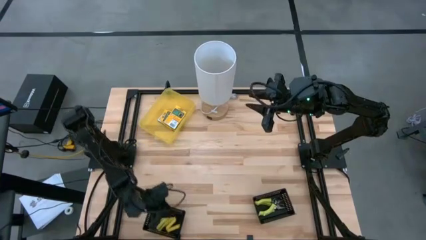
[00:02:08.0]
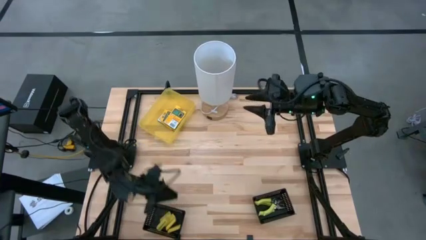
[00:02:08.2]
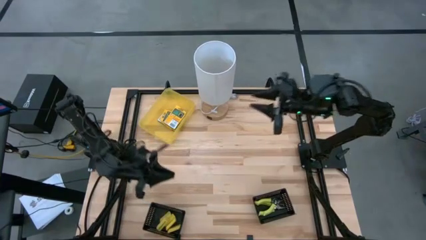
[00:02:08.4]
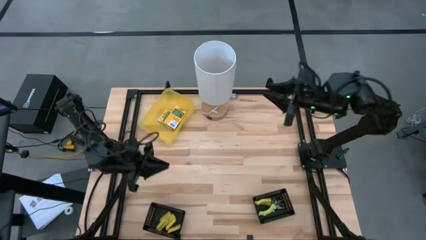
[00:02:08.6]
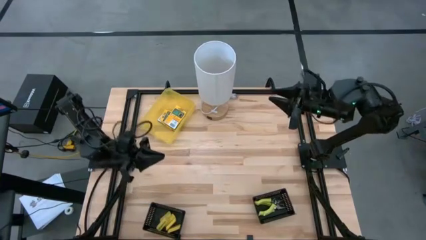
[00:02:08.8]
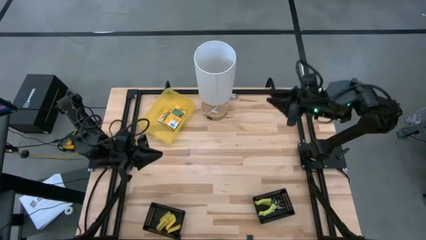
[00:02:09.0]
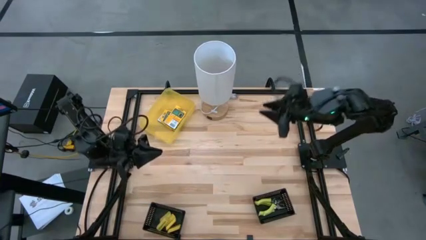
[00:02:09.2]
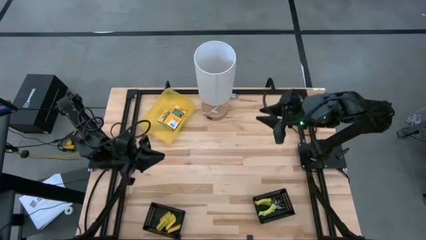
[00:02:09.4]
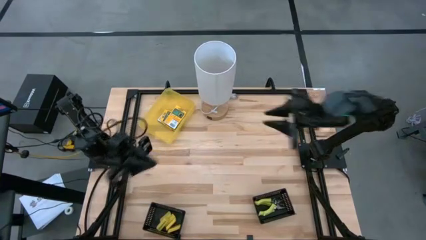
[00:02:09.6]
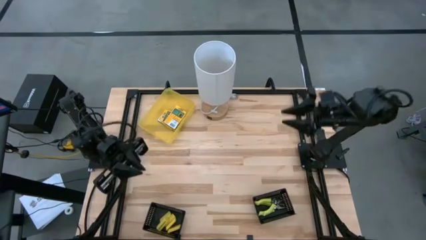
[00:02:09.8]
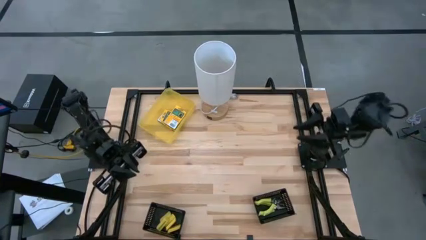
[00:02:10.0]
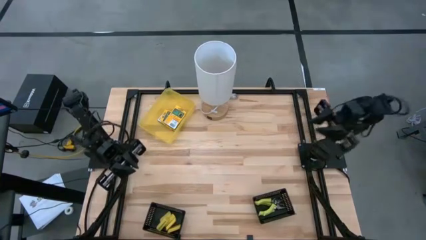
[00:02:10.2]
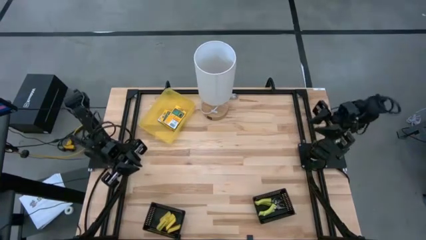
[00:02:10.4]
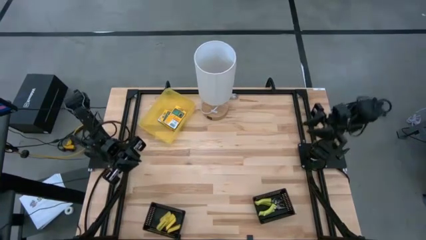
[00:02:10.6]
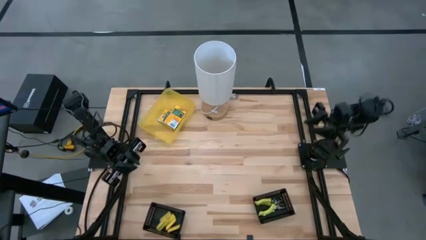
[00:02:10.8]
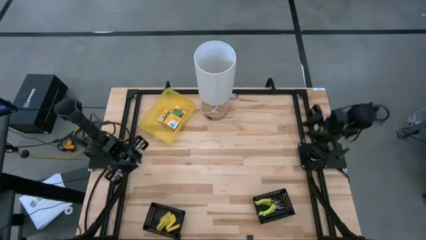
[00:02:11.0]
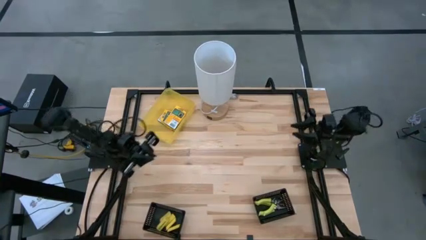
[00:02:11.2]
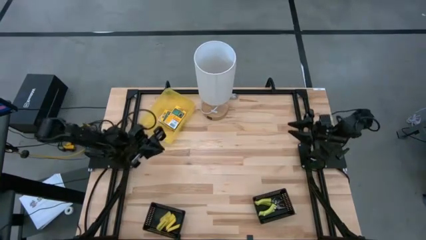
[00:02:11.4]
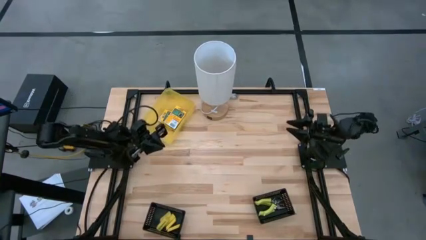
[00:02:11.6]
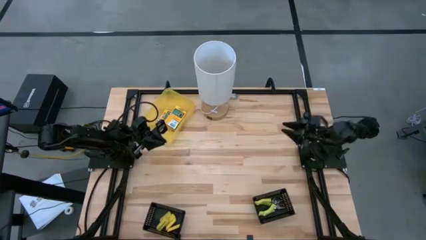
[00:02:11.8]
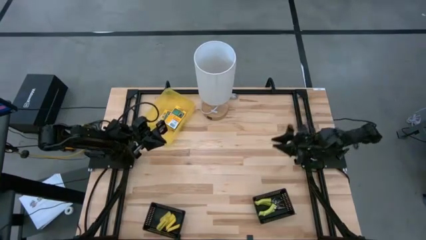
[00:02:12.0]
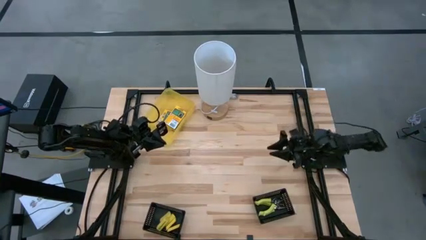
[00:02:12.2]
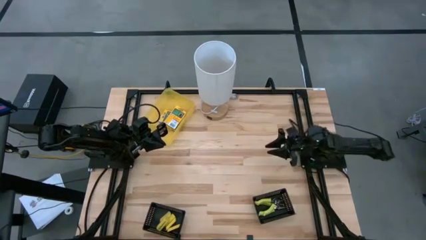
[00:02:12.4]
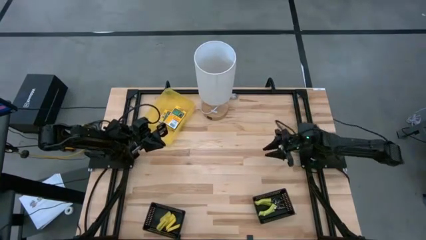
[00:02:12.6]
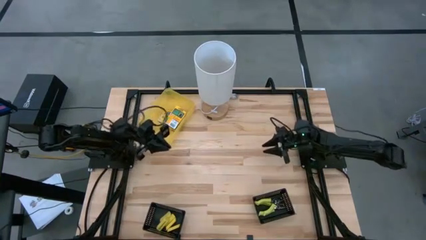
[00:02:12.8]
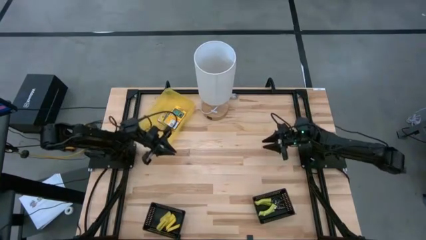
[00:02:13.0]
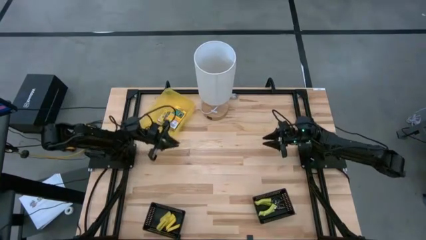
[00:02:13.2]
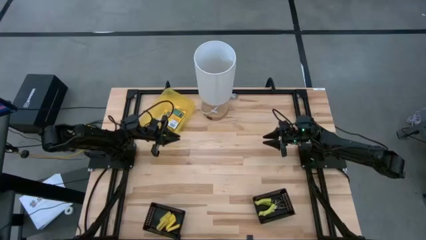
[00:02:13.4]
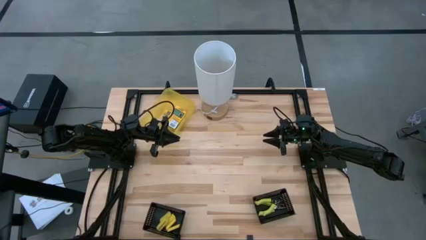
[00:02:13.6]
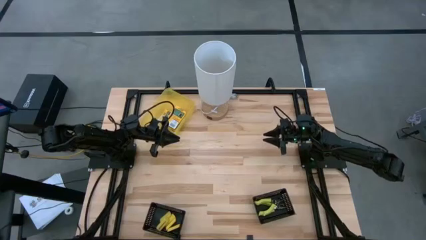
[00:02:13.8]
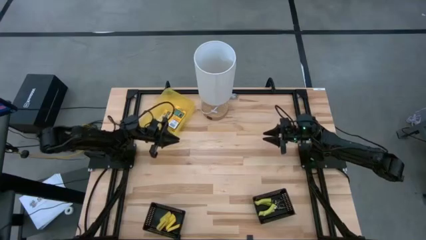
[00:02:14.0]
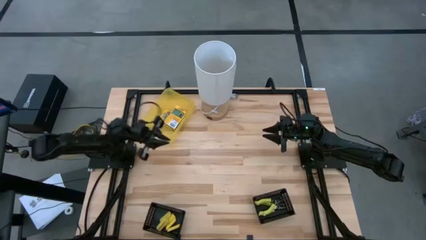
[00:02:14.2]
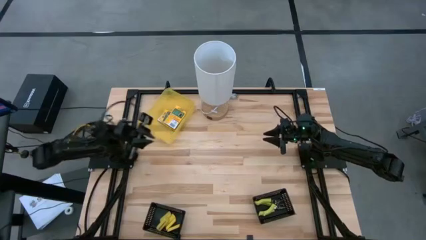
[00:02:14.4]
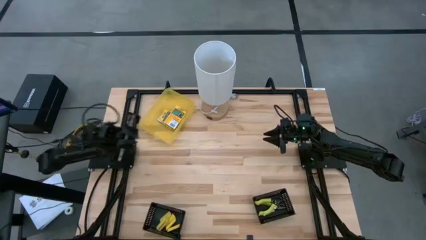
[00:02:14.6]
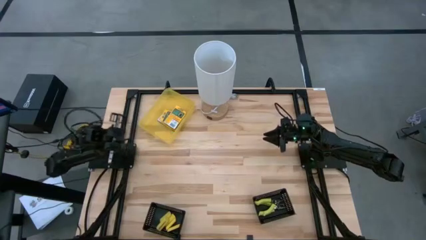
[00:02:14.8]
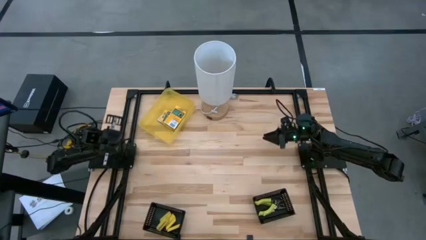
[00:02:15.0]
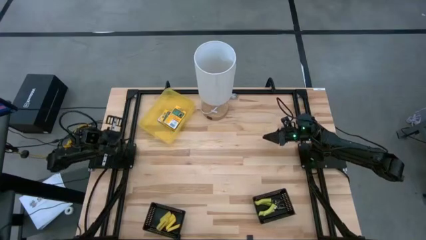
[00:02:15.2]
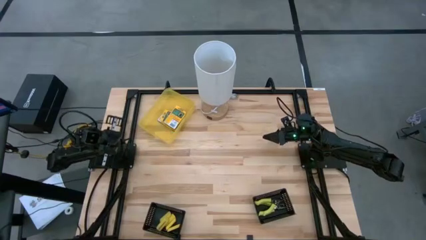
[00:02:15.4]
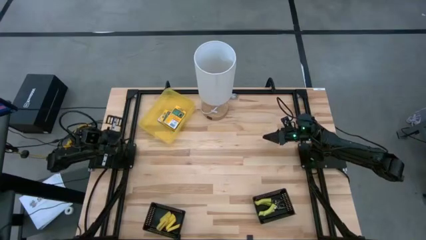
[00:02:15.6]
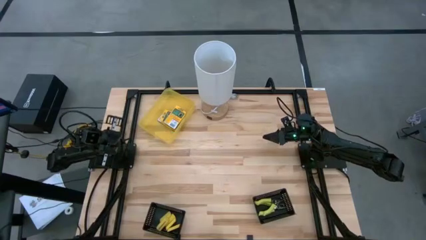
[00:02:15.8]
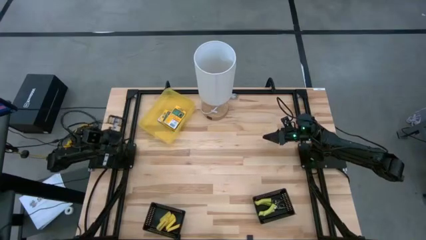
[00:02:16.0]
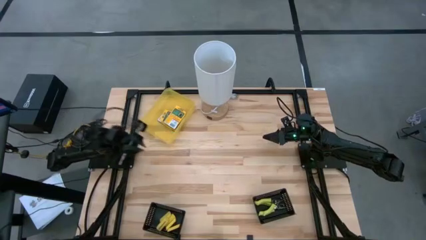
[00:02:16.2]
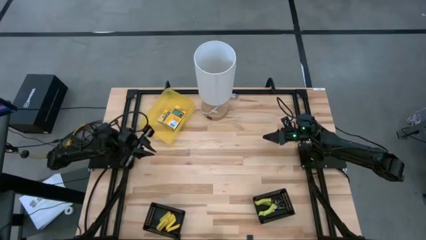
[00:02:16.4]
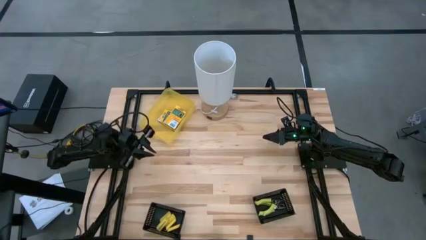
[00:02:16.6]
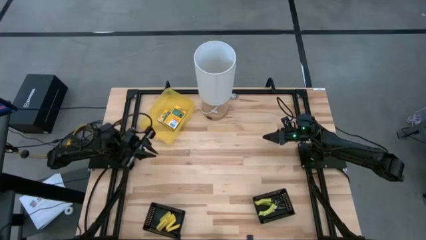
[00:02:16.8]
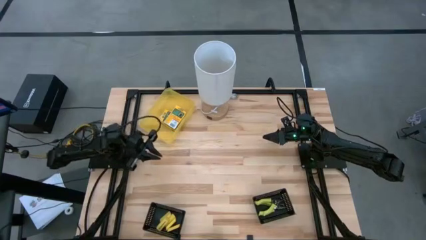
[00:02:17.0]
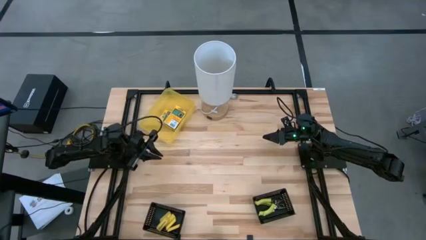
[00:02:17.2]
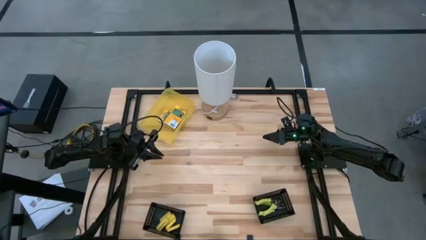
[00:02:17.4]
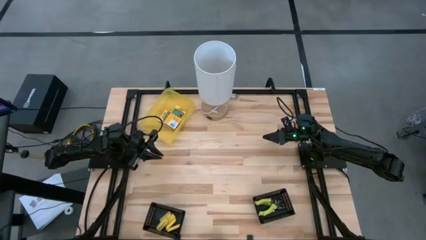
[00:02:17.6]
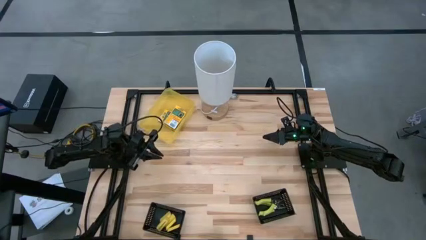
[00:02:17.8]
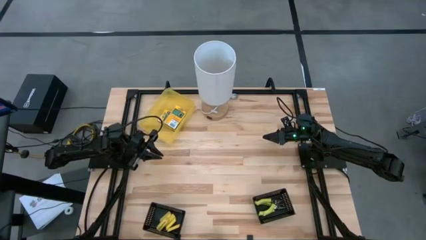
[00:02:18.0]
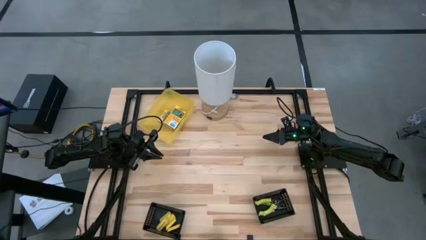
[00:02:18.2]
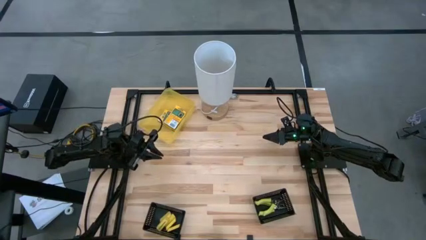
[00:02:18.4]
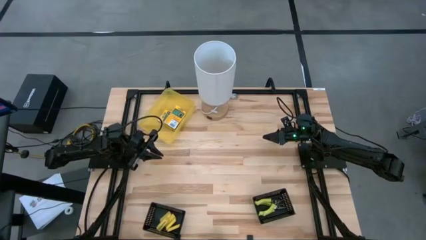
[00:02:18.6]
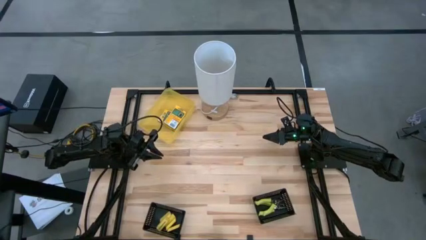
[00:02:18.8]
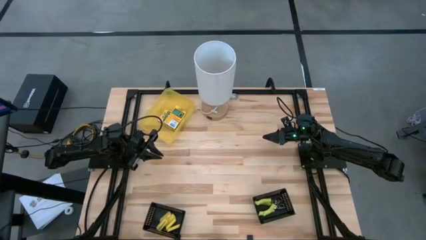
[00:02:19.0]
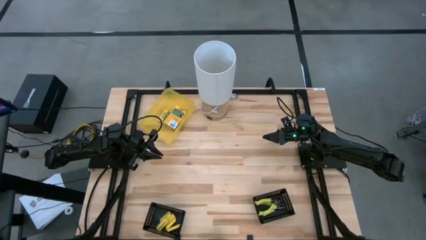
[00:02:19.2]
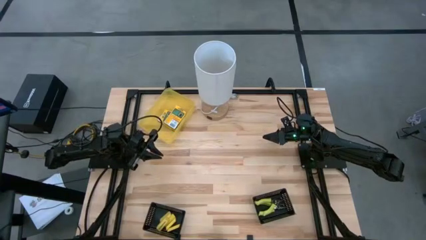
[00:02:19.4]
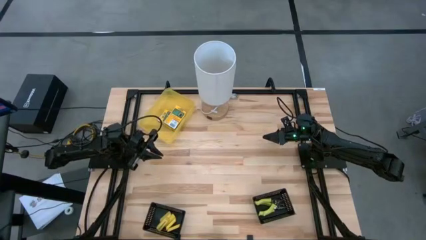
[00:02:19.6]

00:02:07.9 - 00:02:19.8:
Task: Pick & Place School Supplies
Return to Home Position

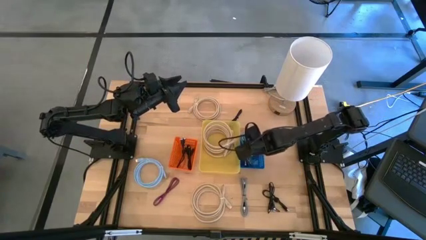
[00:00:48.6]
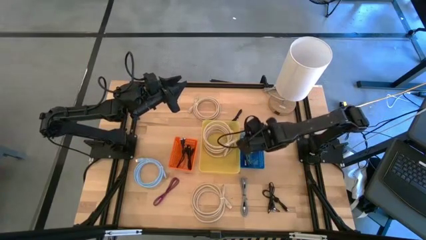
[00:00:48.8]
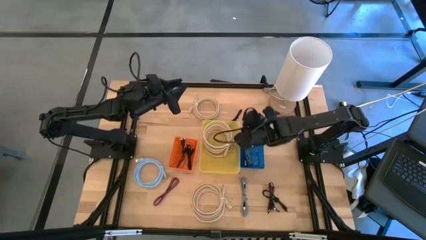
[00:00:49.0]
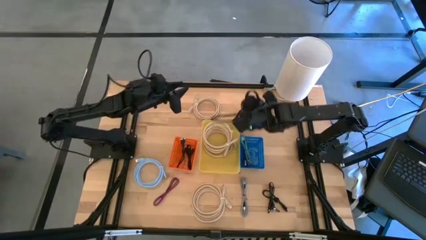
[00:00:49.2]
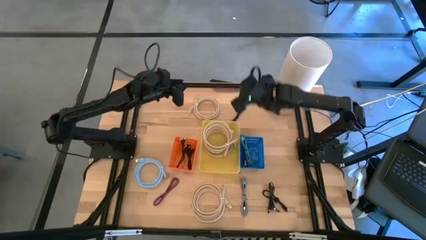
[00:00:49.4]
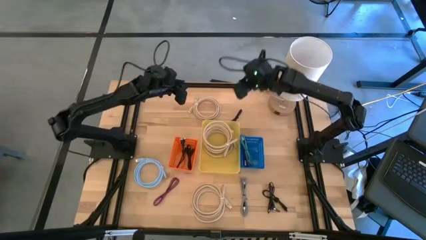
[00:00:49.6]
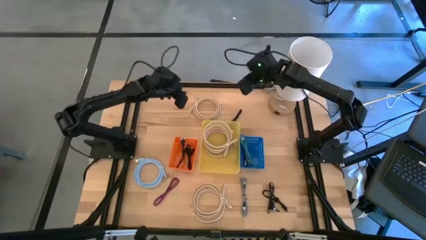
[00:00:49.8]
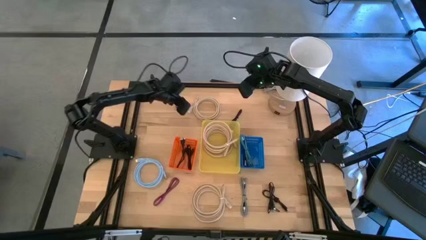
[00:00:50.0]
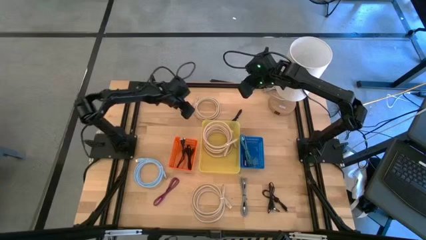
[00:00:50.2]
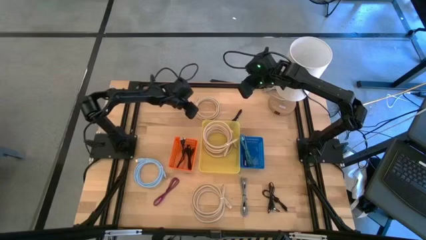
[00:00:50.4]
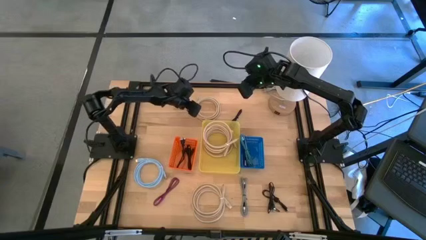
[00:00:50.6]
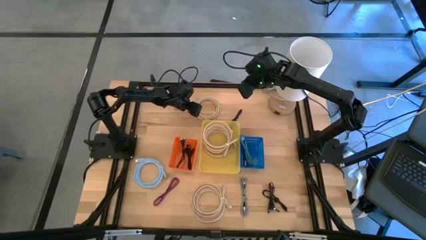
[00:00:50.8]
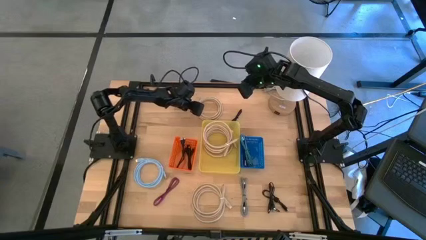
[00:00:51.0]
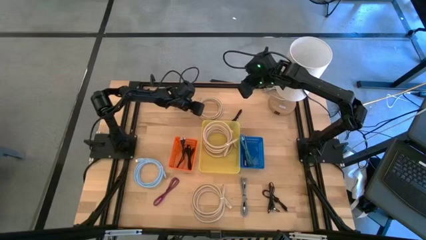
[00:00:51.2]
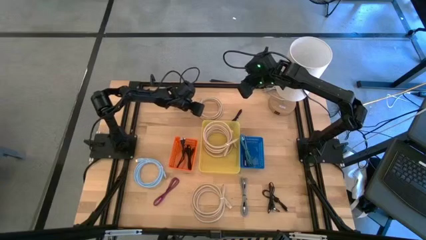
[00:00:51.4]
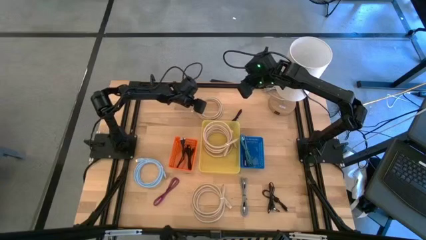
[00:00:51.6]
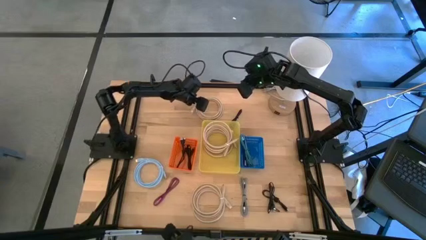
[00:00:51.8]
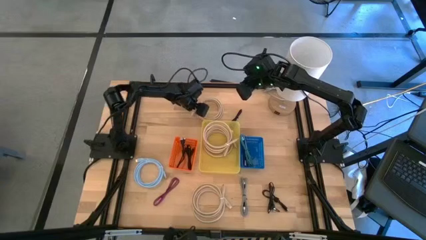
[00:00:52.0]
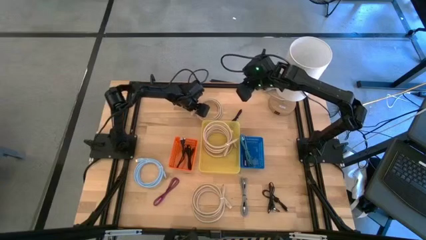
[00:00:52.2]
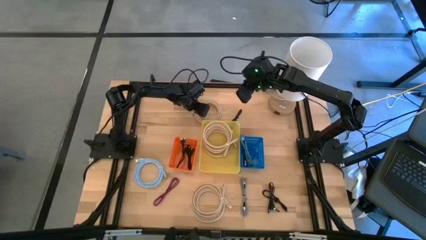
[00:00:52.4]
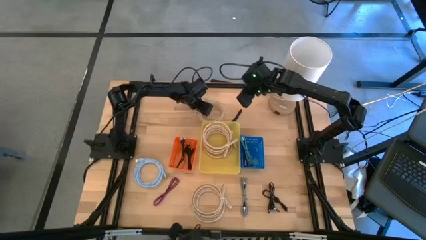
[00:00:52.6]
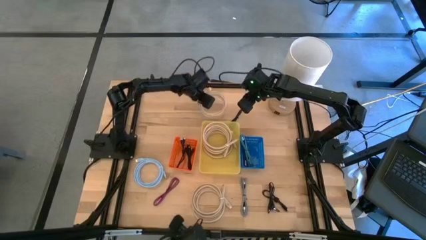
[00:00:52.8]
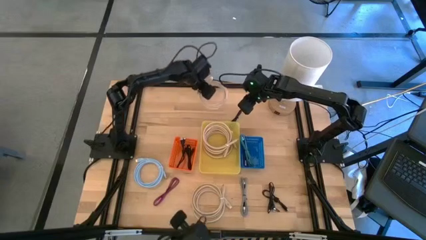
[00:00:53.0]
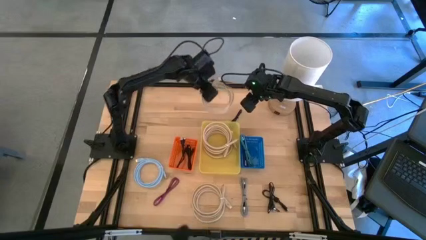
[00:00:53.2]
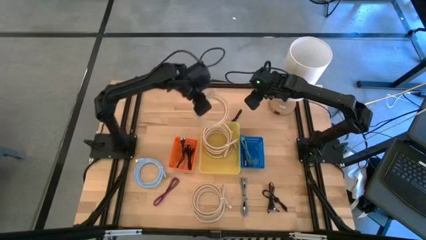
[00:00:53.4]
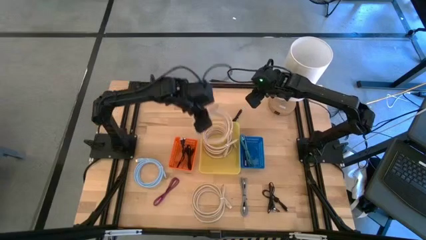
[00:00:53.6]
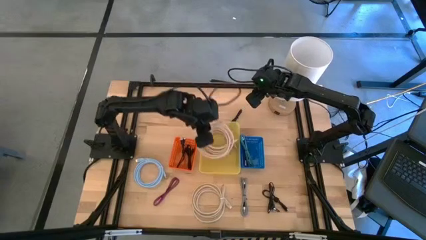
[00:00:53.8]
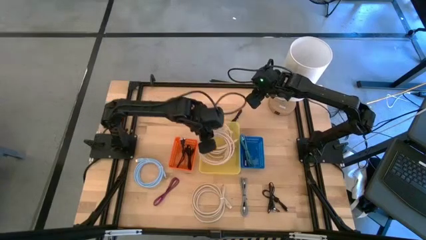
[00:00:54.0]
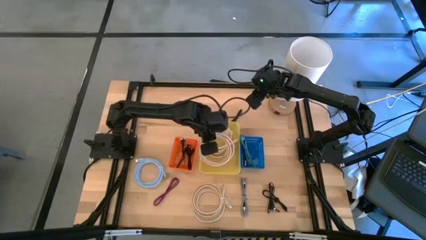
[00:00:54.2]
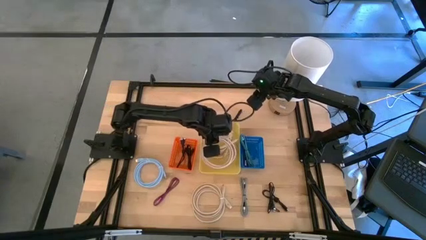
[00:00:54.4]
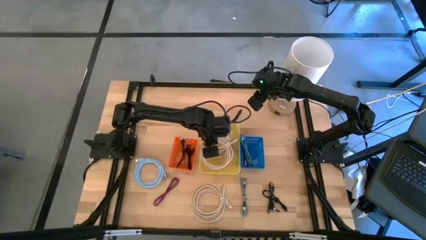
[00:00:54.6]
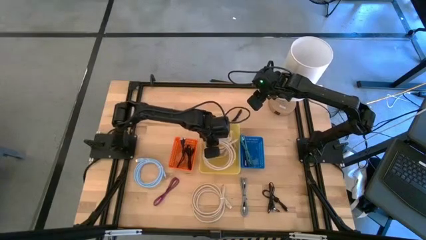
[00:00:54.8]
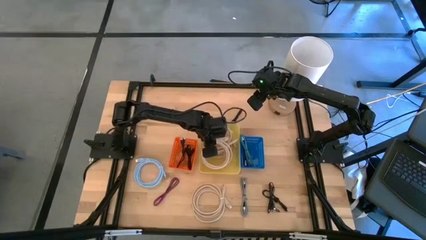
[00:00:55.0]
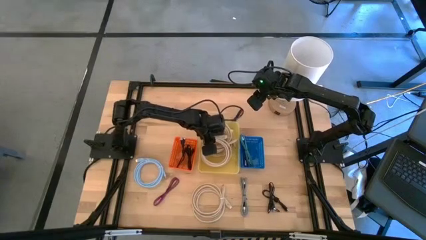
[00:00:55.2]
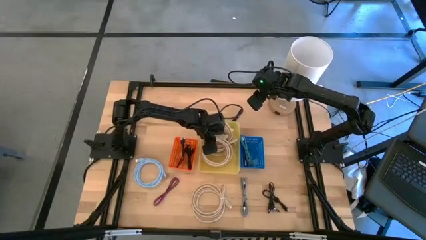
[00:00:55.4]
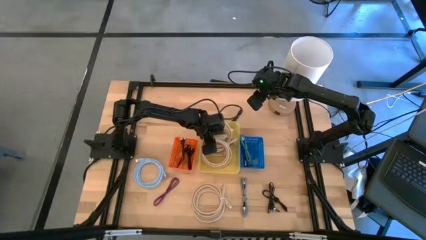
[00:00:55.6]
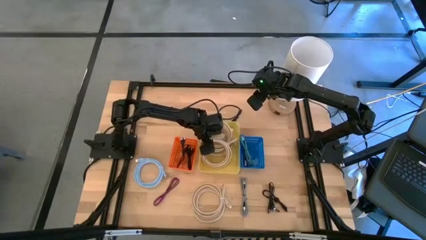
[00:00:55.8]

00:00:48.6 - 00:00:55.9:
Task: Pick & Place USB Port
Put the white usb cable into the yellow bin
